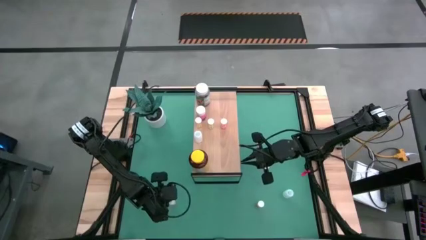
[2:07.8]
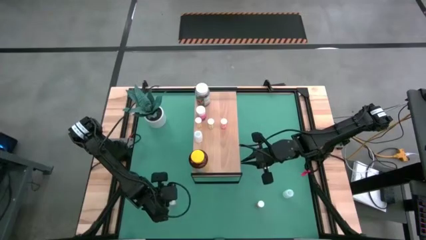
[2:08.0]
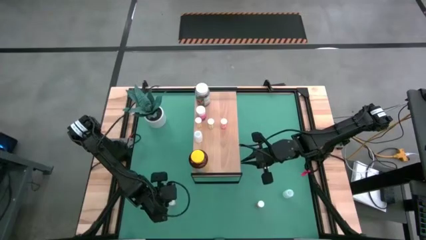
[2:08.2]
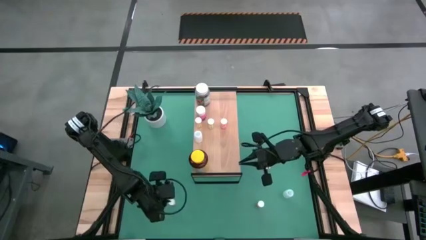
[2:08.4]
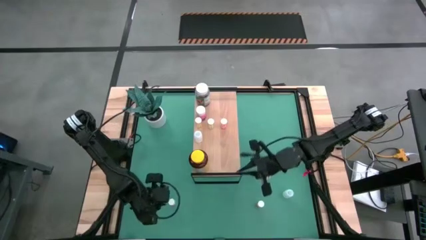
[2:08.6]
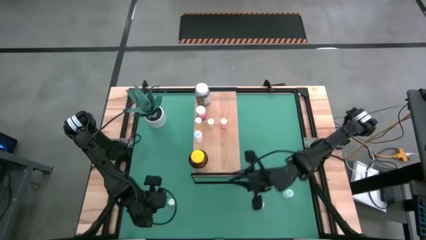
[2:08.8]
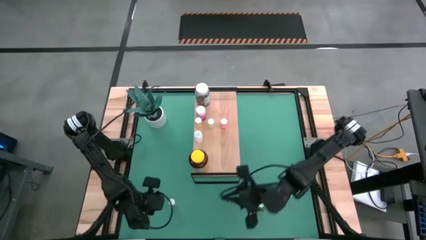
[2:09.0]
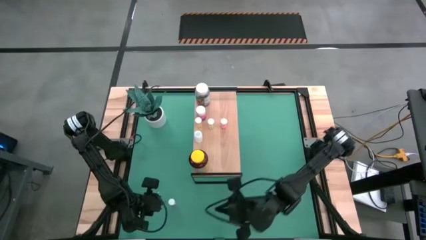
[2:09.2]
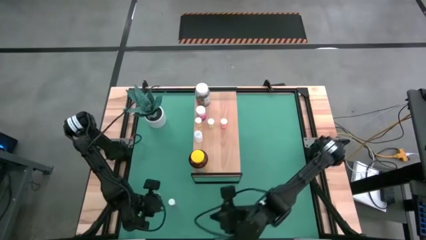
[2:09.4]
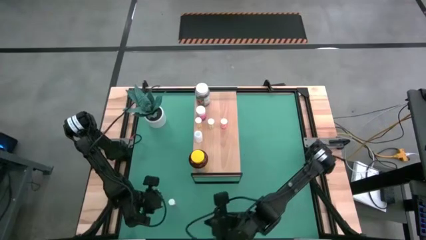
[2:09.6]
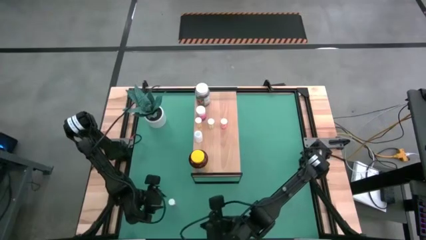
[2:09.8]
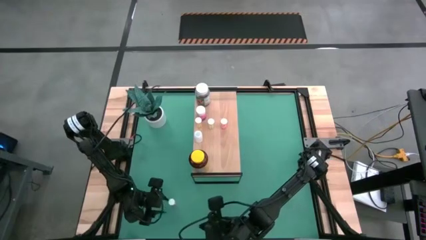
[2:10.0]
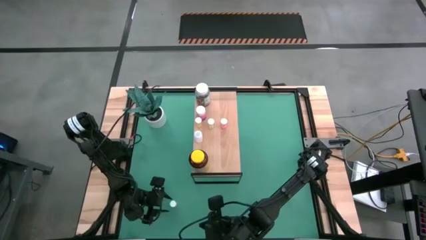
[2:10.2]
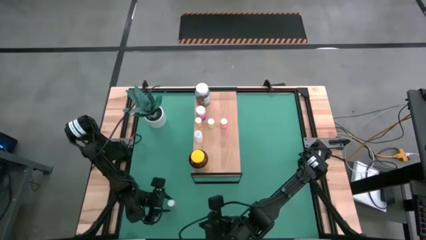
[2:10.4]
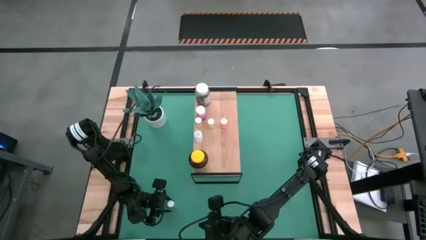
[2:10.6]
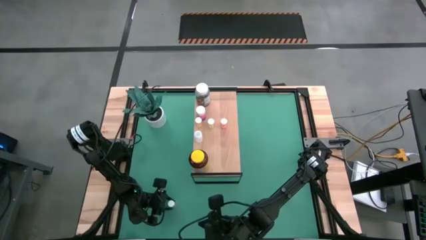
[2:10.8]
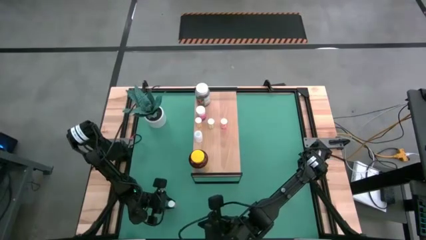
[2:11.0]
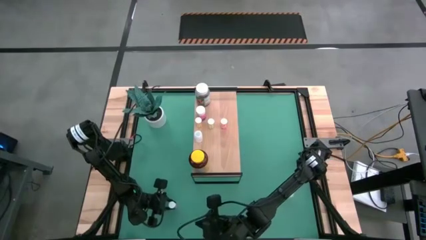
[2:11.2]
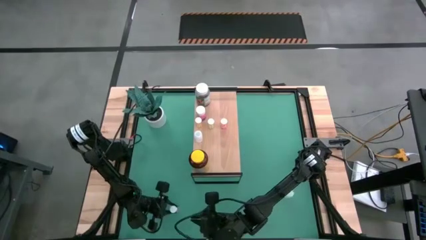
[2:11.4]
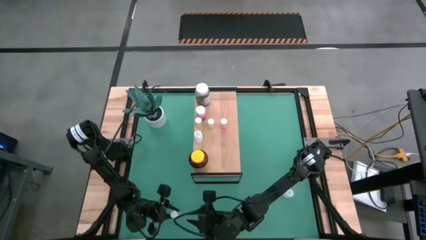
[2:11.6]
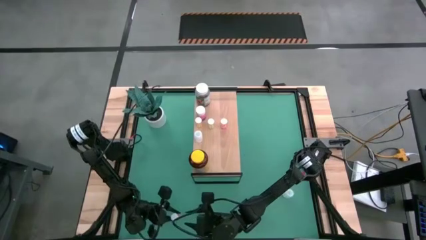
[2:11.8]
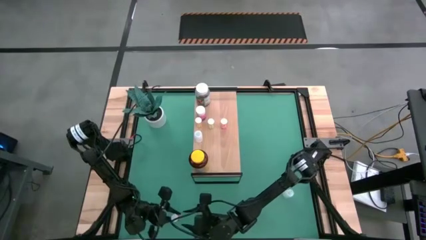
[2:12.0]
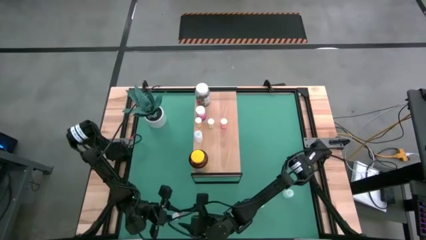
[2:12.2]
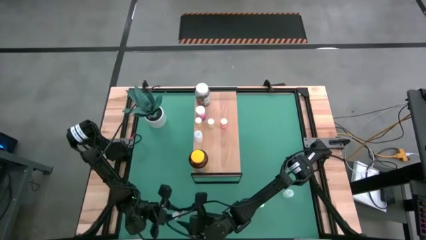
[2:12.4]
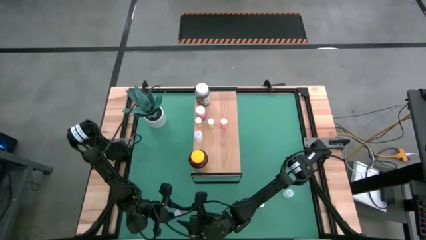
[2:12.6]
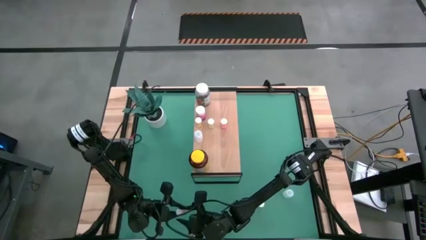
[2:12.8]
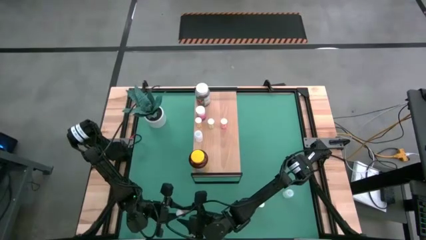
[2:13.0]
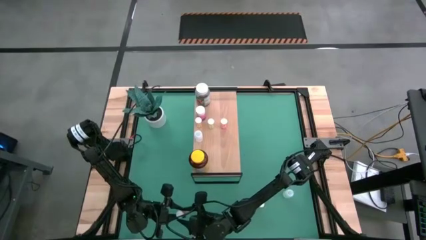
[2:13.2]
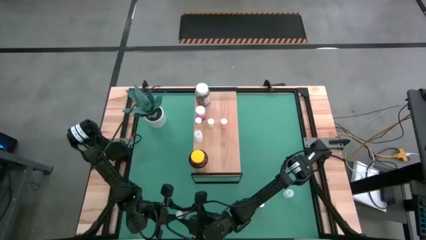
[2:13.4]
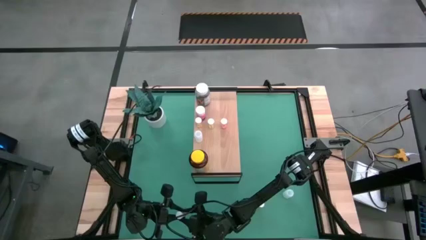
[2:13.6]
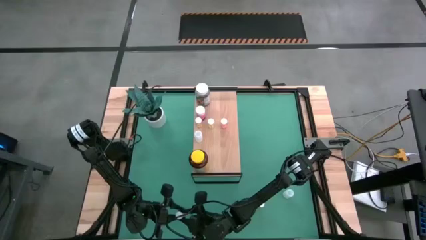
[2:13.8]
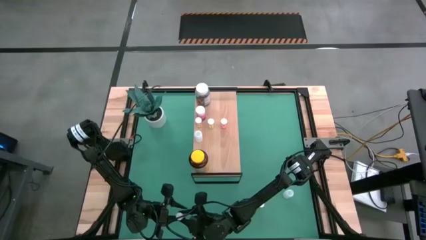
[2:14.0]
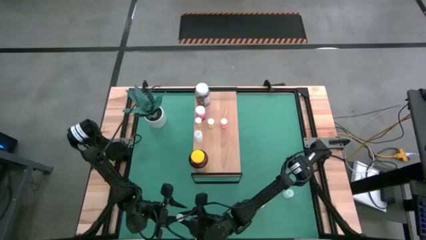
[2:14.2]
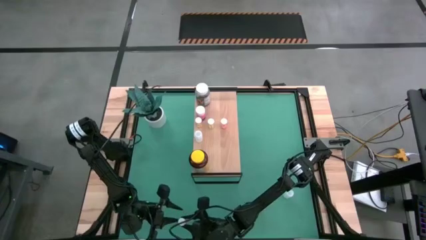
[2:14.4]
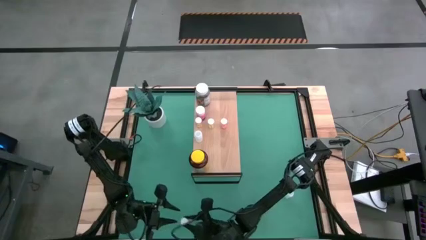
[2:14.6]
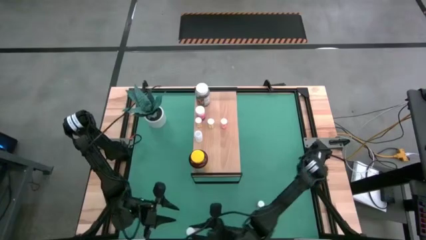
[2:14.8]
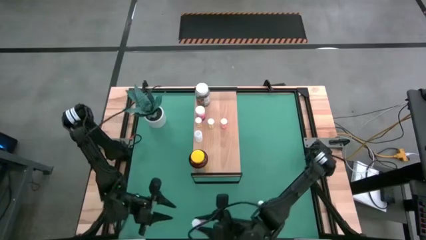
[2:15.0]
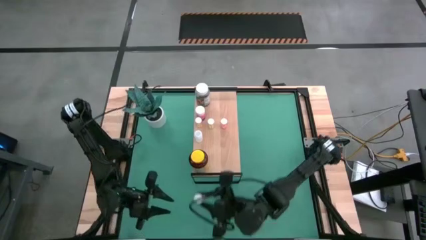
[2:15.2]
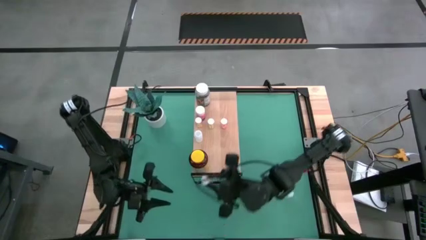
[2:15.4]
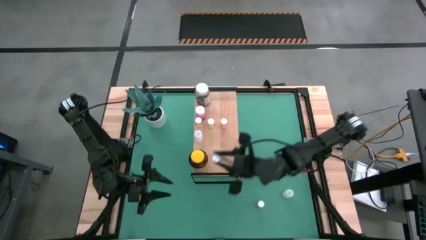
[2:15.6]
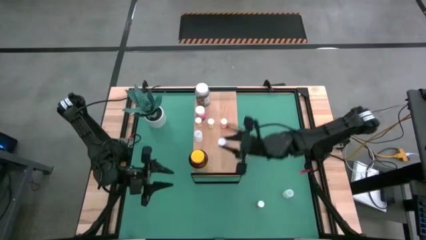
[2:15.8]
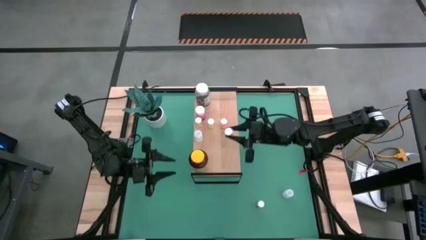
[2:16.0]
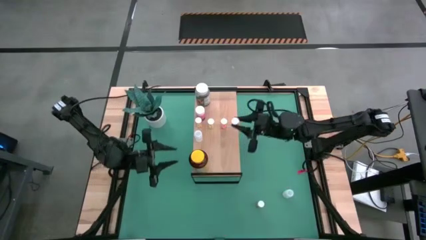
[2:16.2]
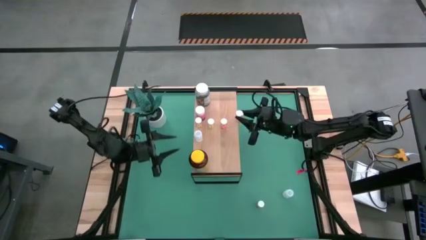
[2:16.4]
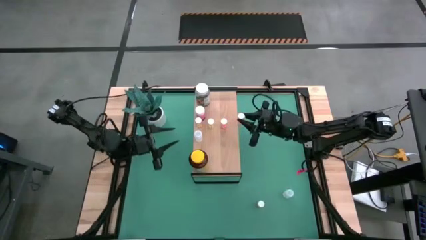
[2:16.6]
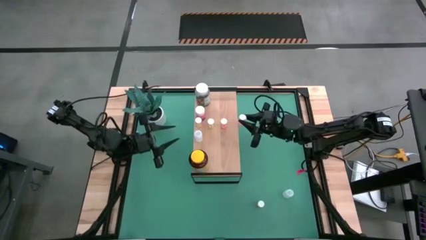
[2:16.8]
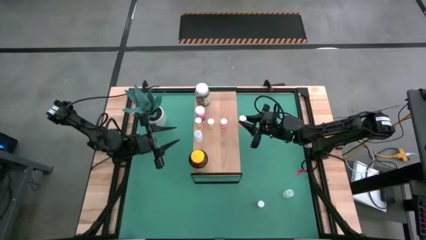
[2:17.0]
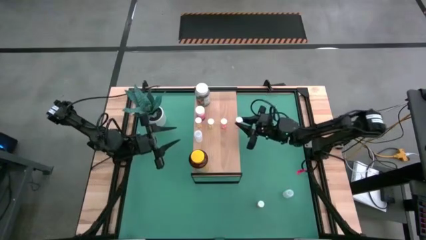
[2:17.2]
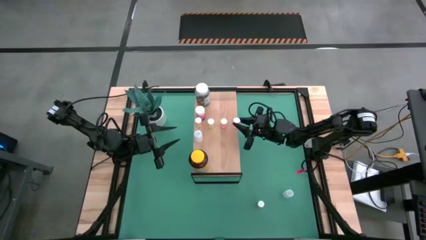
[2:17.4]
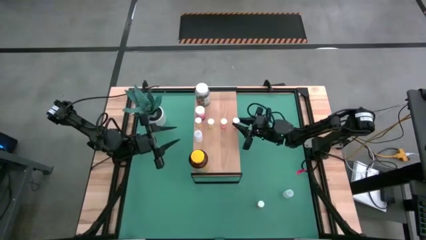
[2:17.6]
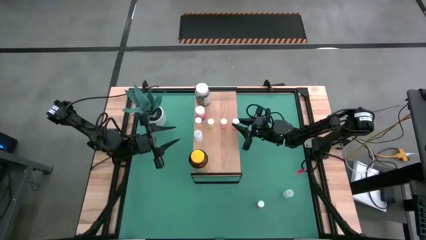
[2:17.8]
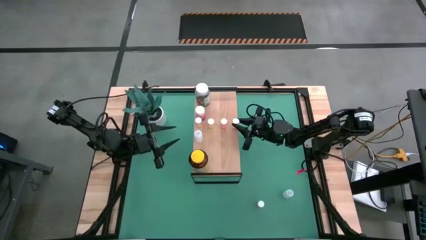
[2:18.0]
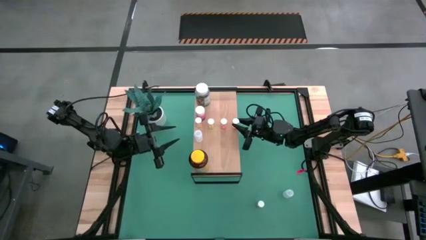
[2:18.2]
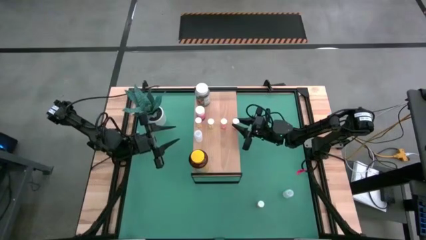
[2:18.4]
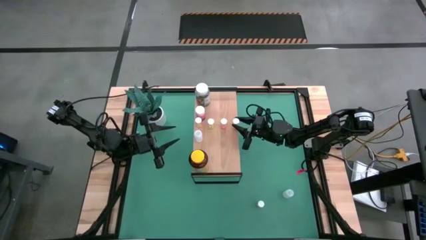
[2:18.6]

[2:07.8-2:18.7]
Task: Pick and place medicine bottles onto shelf by color
Put the yellow pill bottle on the shelf

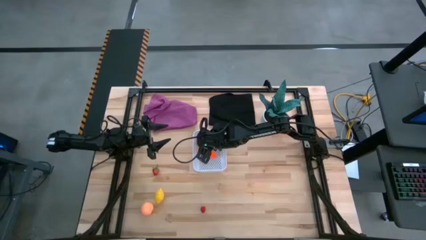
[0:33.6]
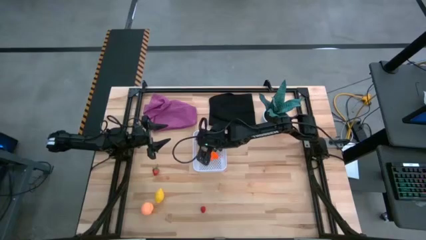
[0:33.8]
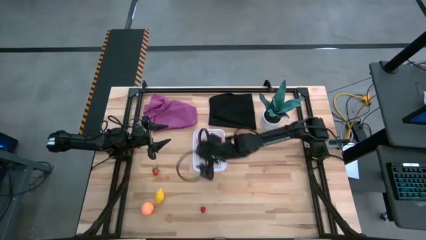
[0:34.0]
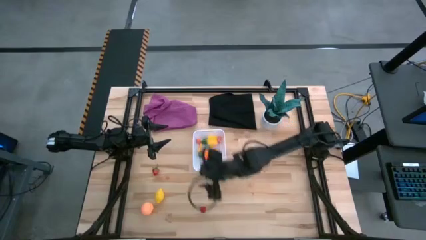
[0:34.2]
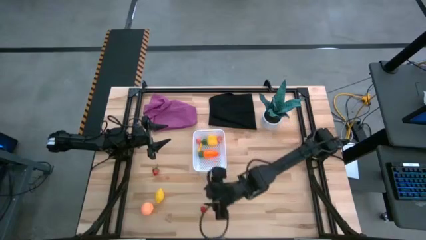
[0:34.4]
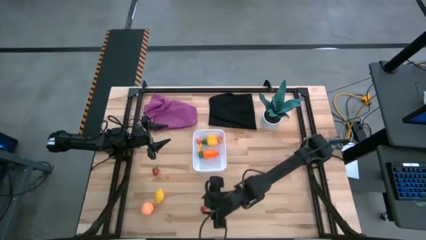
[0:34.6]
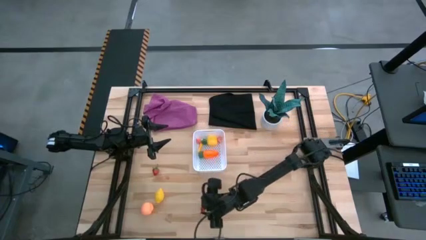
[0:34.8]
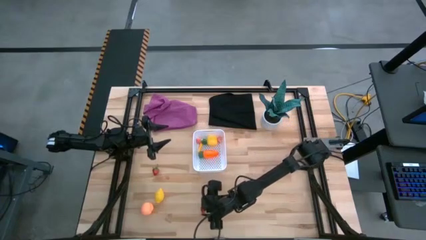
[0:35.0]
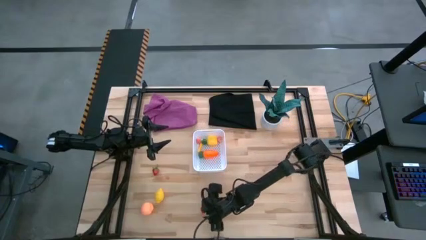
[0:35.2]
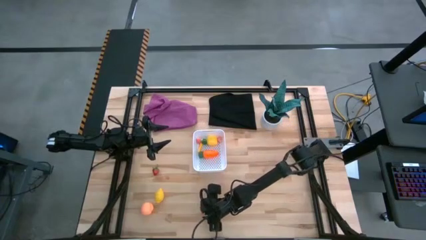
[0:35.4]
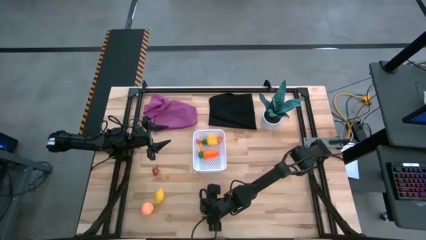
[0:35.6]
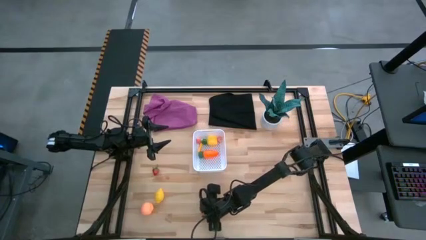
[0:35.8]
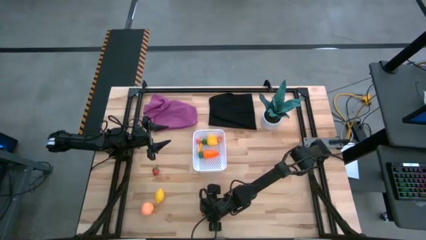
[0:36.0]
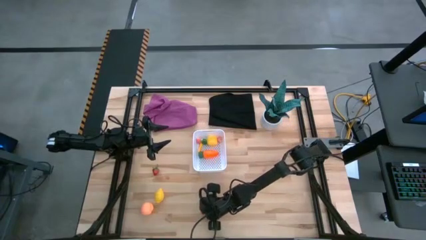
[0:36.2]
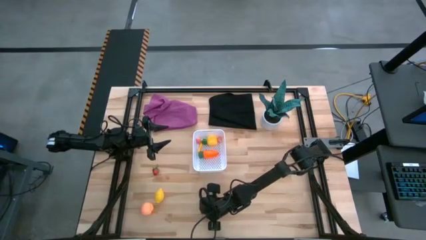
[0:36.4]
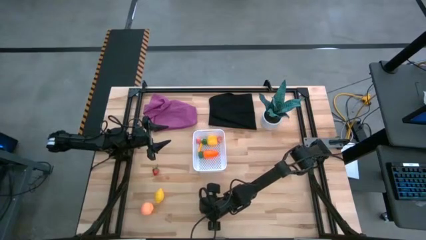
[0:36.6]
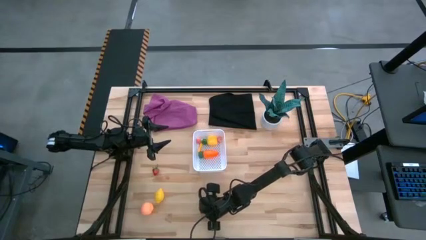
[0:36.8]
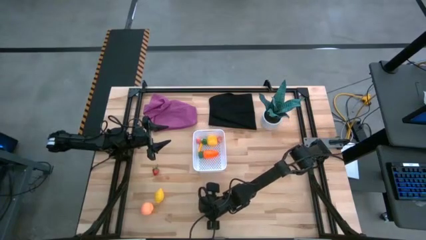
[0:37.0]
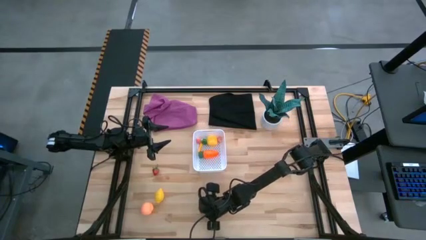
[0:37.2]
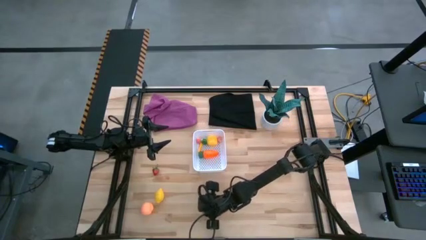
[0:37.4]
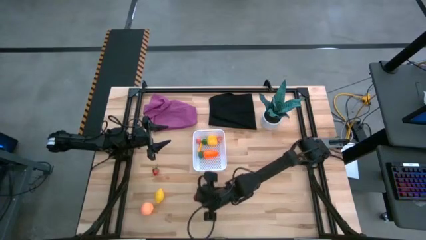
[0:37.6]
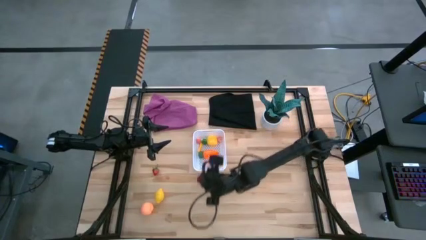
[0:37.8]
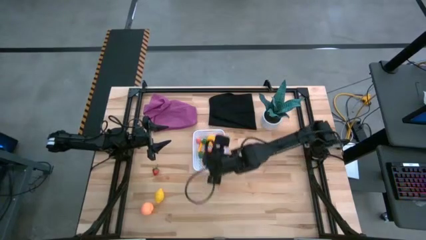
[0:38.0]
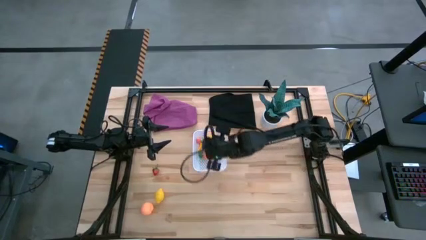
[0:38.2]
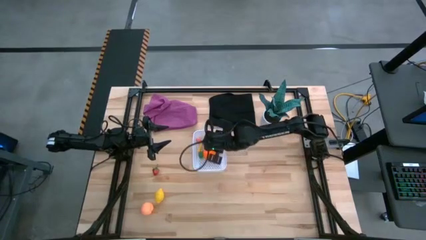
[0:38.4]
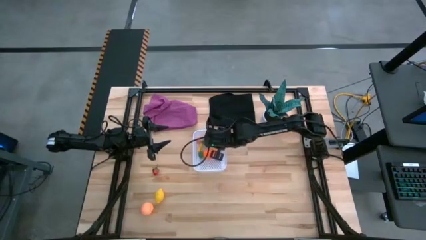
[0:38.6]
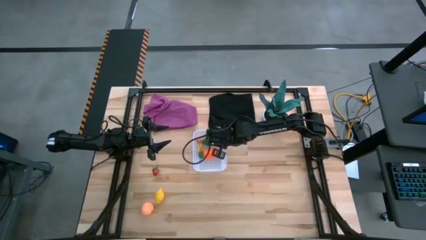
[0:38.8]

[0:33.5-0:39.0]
Task: Pick and placing Produce into tupperware
Put the red raspberry into the white bin
